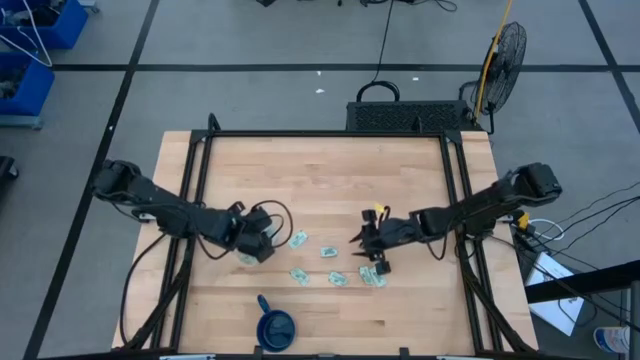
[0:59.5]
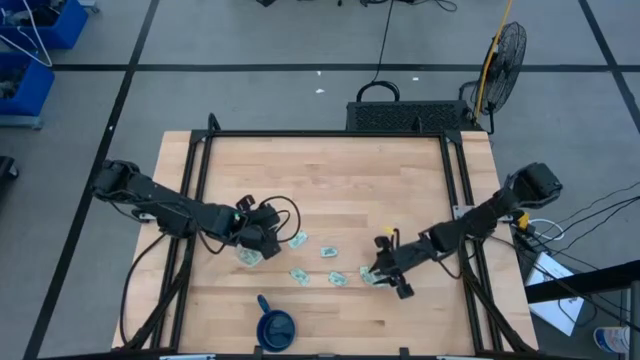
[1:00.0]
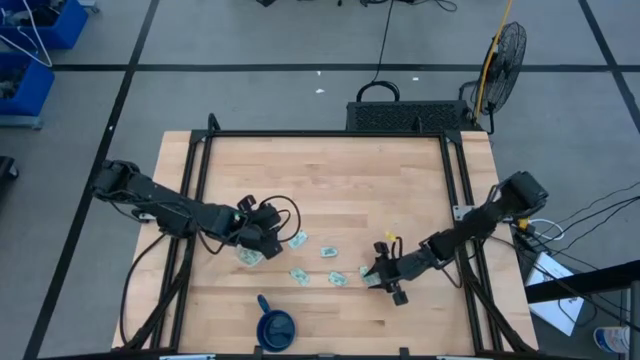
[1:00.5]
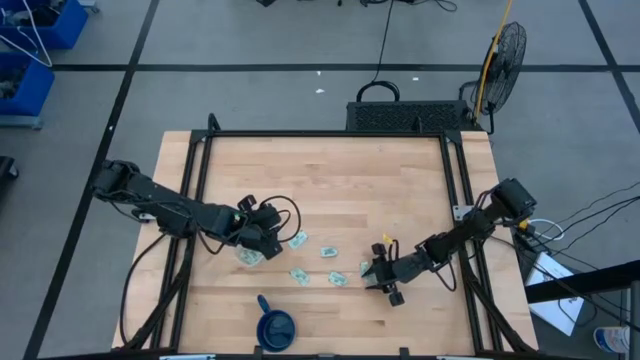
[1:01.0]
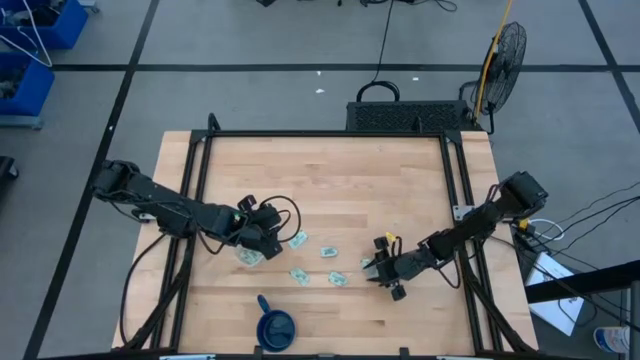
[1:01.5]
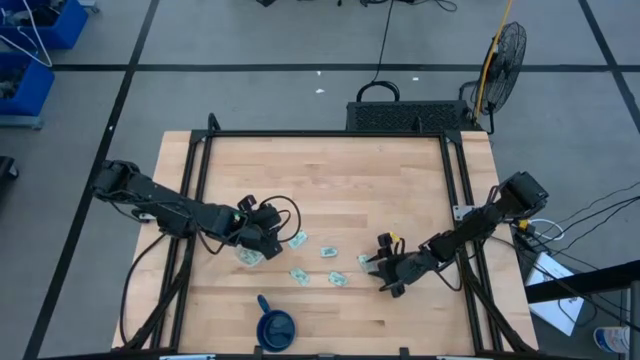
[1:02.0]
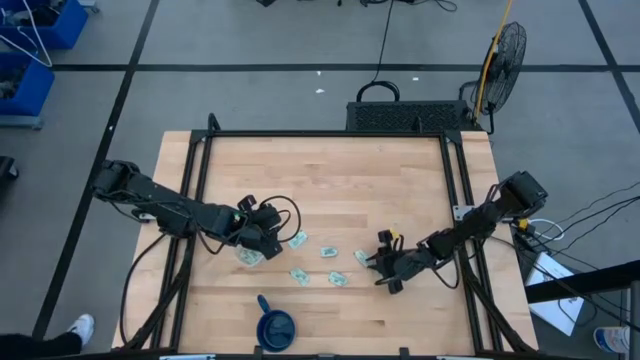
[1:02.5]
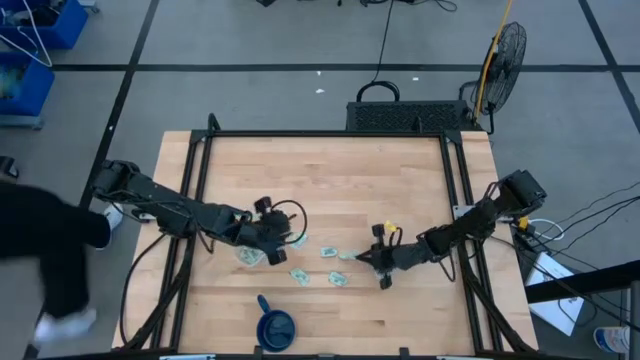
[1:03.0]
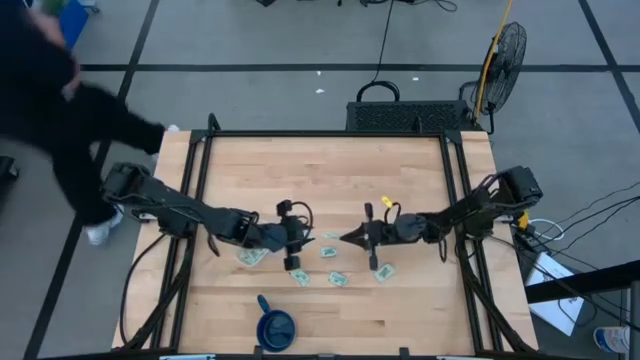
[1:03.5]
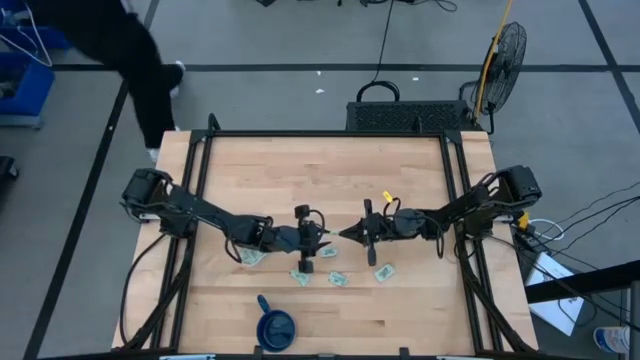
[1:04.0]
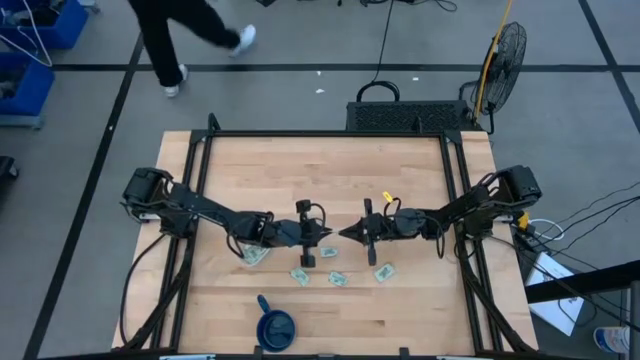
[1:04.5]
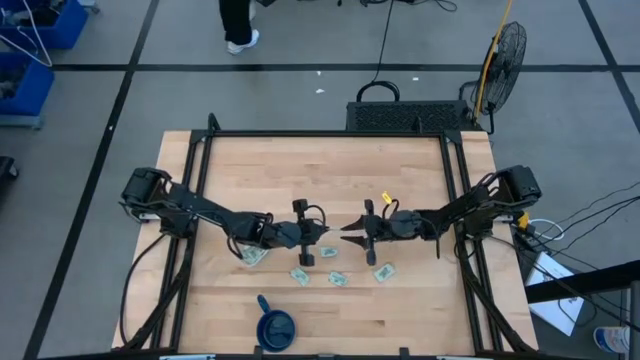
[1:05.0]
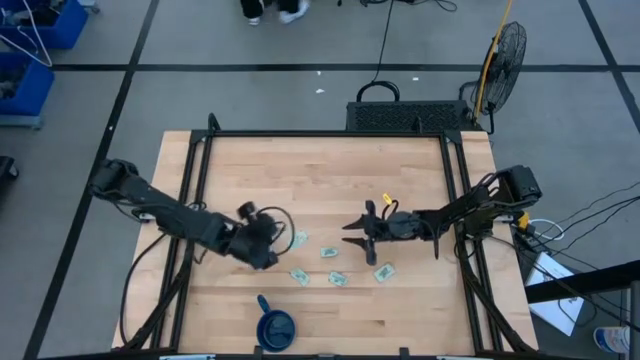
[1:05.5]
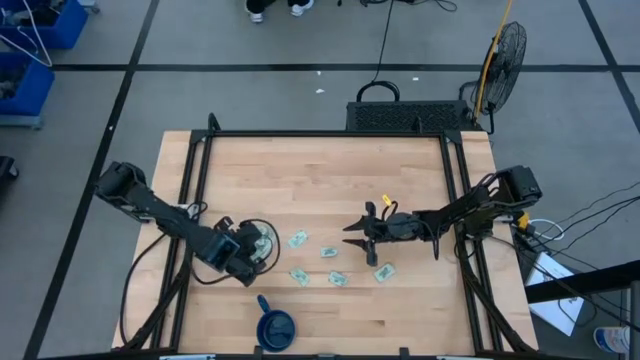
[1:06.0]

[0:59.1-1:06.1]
Task: Pick and place Stevia / Truvia into bins
Put the stevia packet into the transparent container

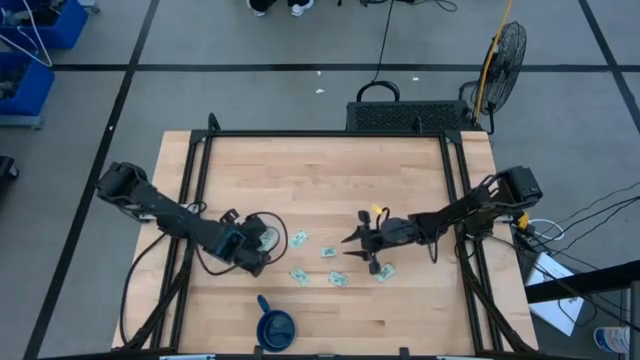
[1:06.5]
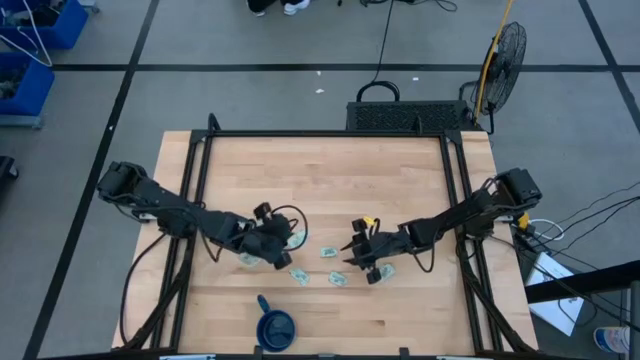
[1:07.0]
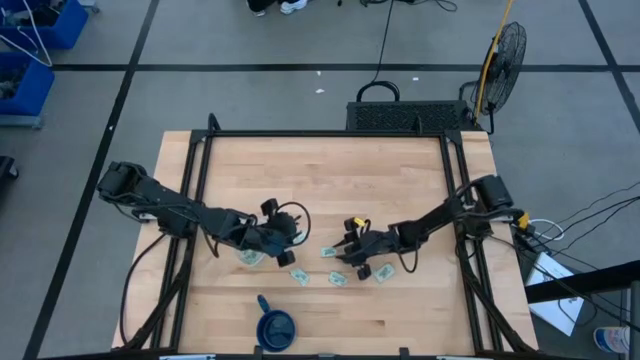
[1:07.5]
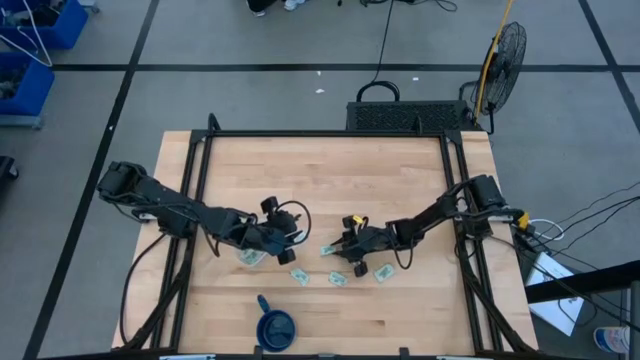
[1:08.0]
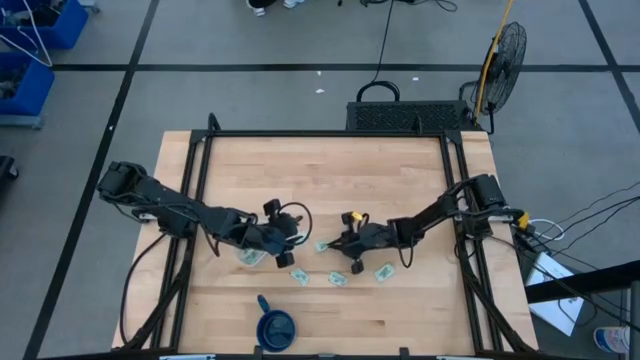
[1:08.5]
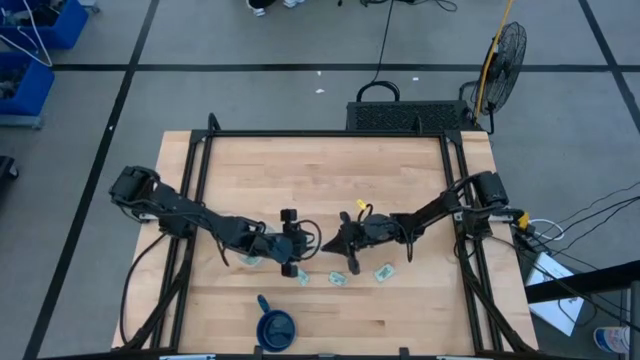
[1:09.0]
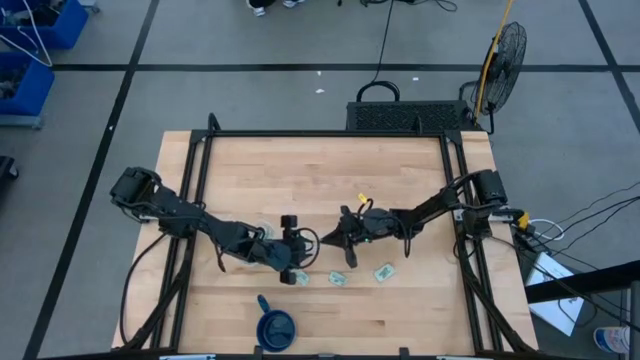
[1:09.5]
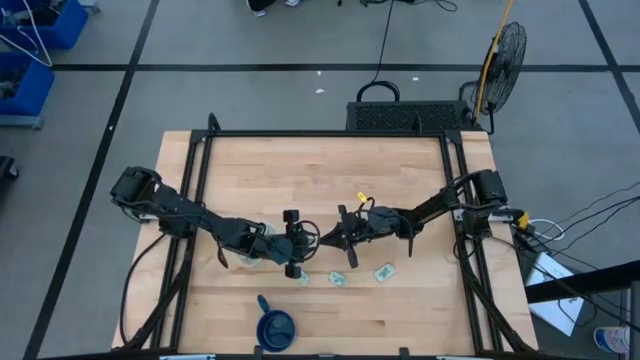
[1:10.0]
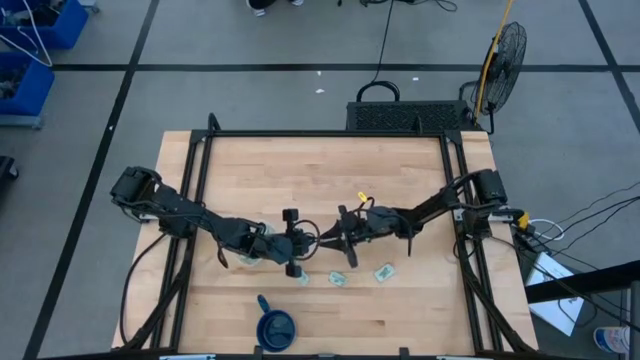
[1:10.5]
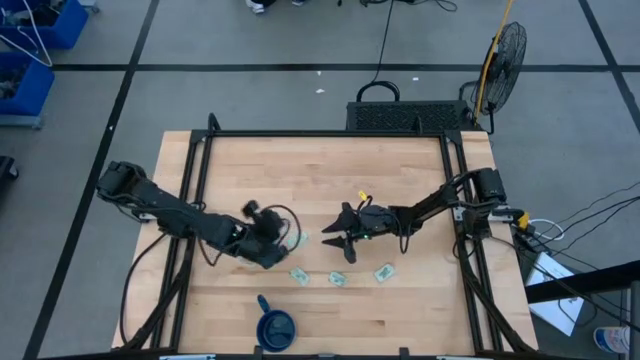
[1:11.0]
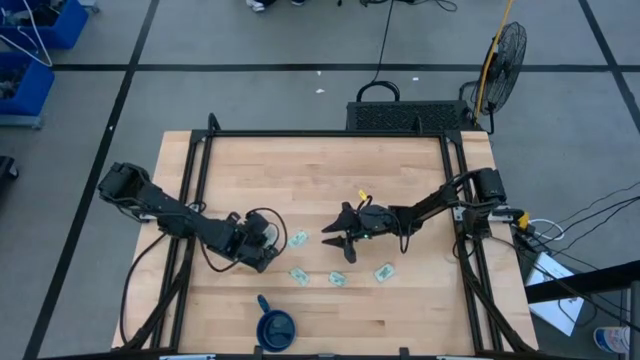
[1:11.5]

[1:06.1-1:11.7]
Put the stevia packet into the transparent container

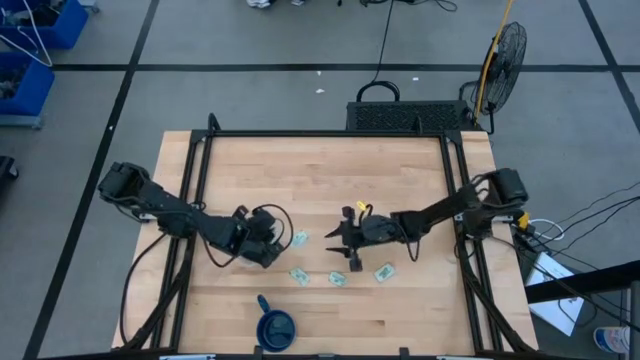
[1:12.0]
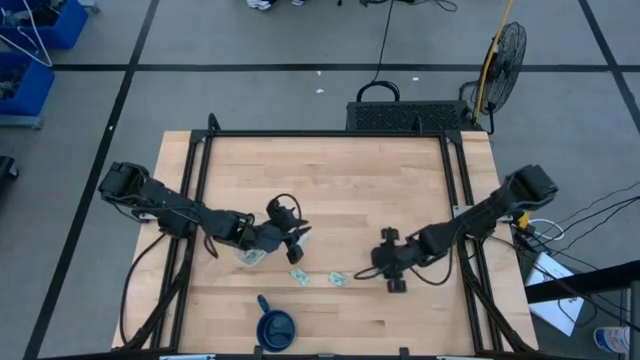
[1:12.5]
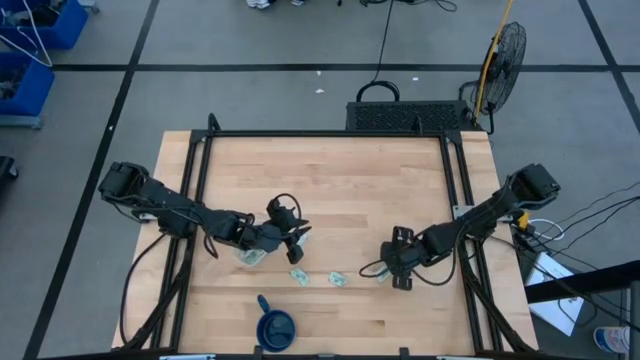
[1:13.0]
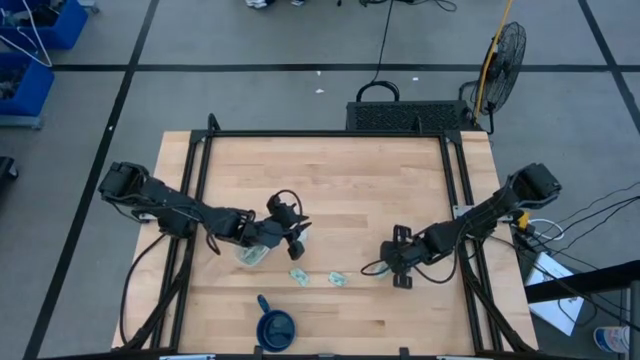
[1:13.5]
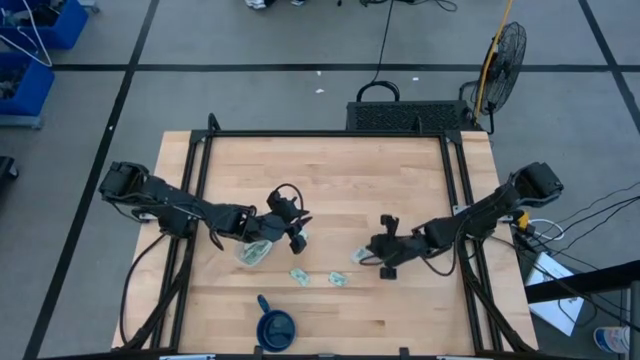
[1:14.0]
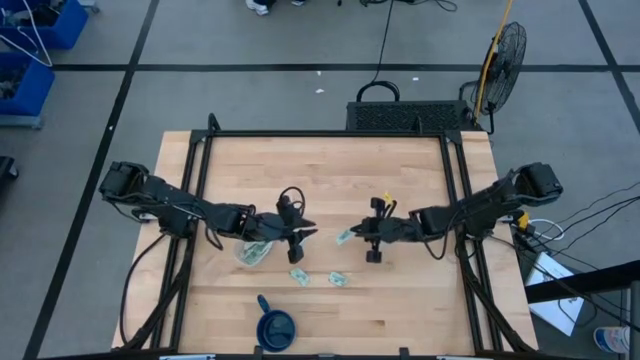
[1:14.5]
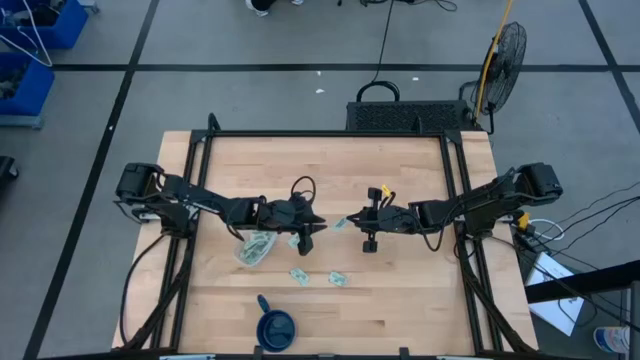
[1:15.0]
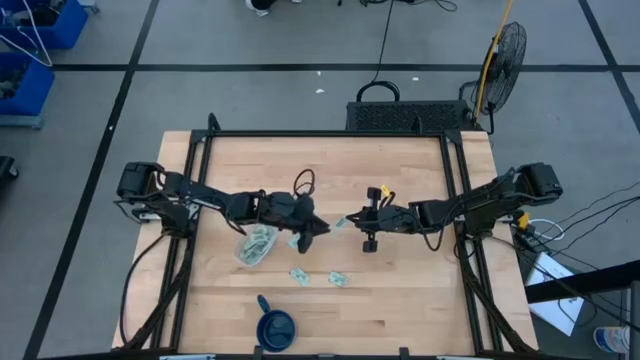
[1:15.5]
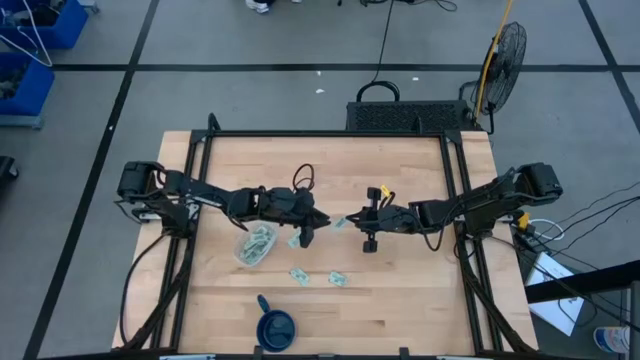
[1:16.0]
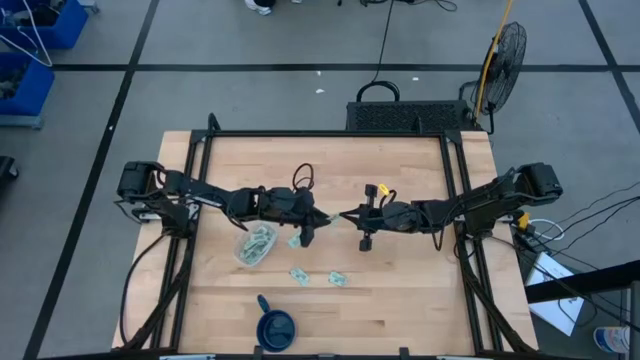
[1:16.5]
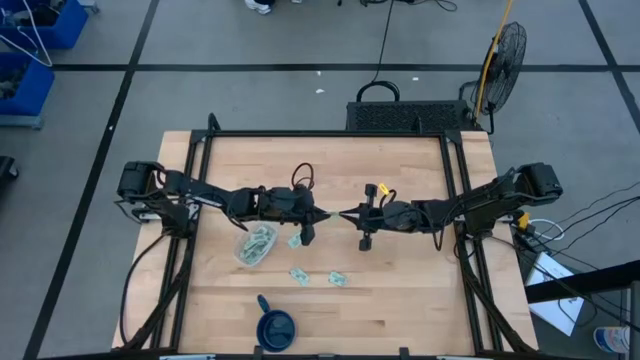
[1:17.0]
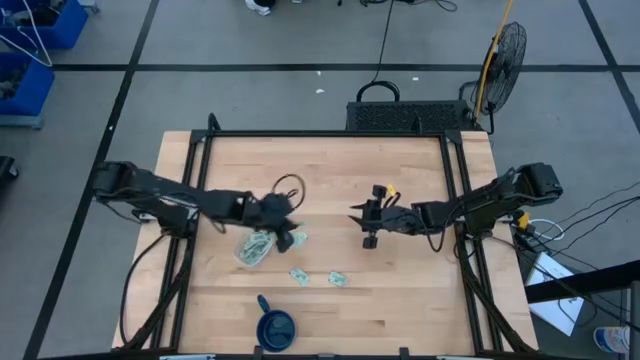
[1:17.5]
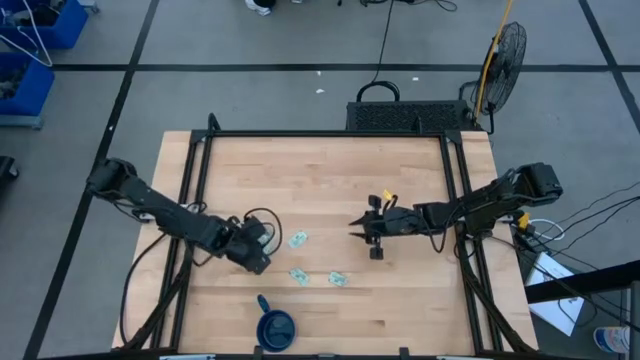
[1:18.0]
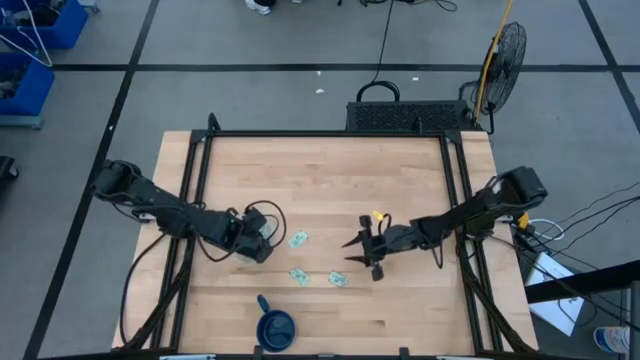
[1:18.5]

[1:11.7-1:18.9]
Put the stevia packet into the transparent container
